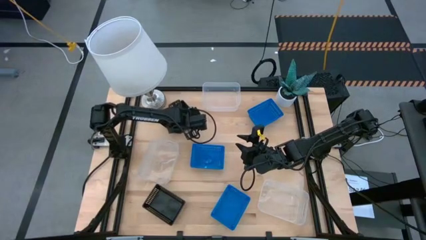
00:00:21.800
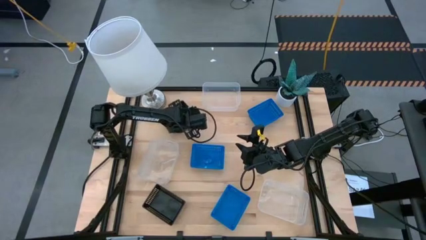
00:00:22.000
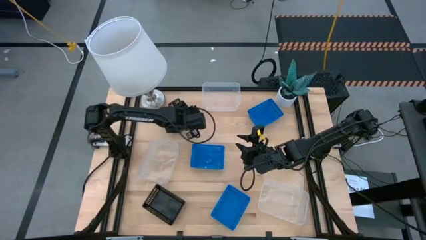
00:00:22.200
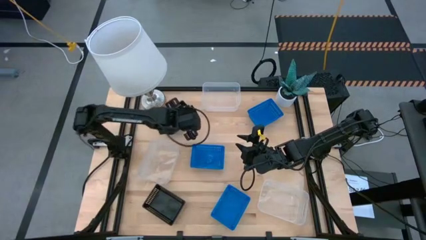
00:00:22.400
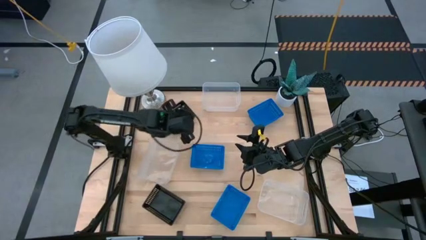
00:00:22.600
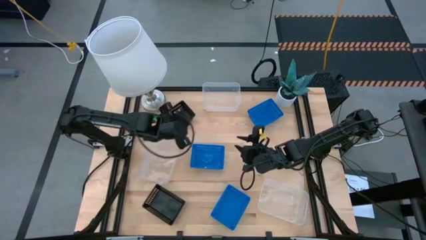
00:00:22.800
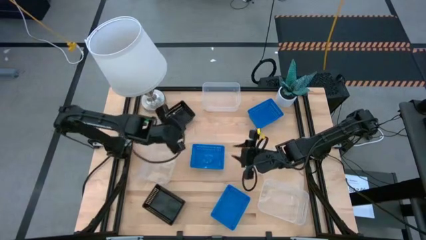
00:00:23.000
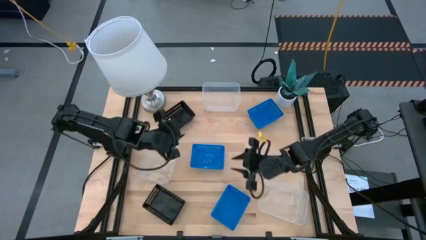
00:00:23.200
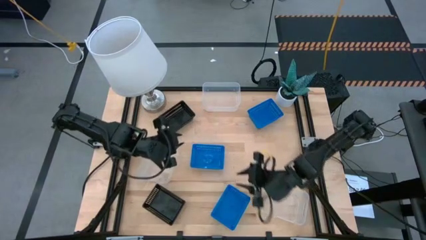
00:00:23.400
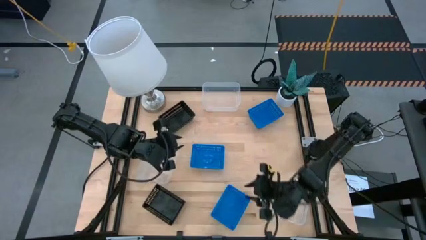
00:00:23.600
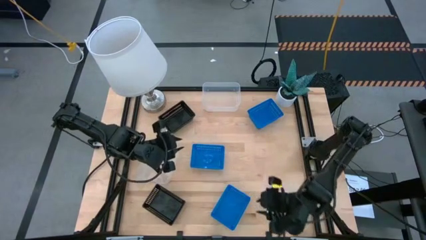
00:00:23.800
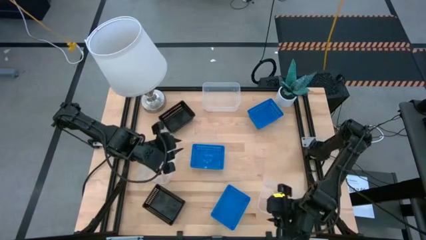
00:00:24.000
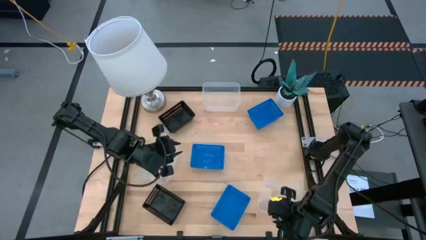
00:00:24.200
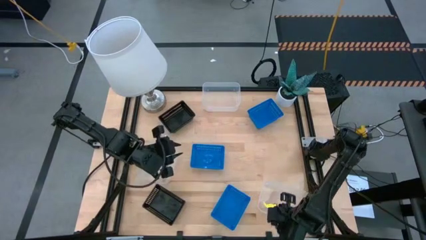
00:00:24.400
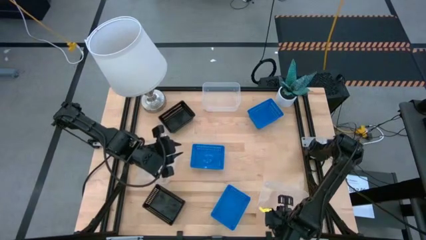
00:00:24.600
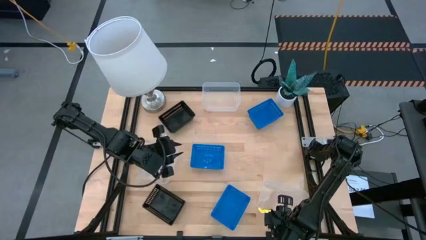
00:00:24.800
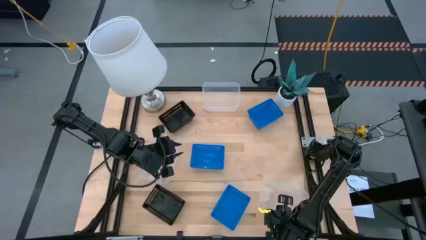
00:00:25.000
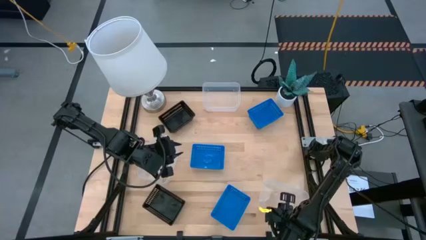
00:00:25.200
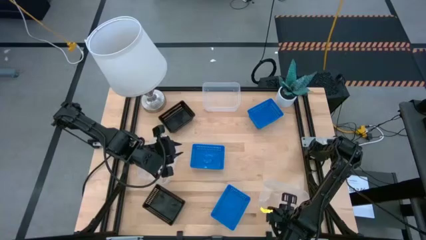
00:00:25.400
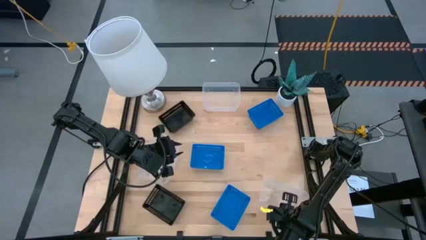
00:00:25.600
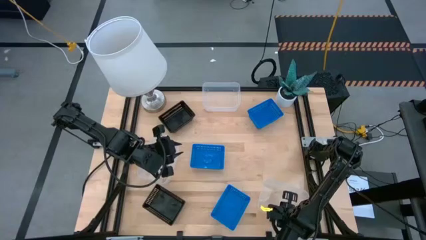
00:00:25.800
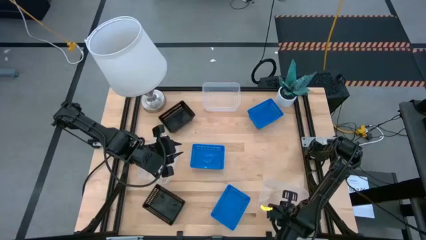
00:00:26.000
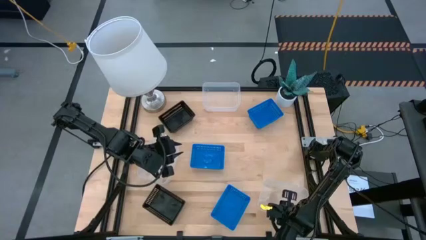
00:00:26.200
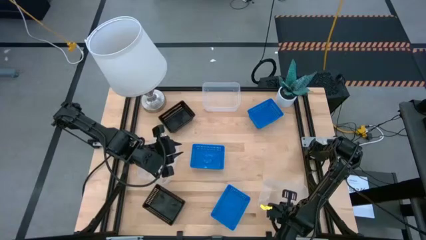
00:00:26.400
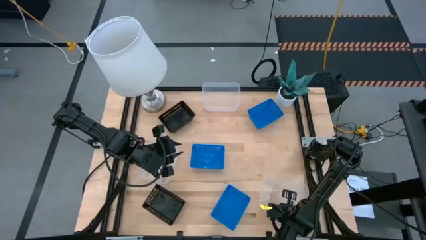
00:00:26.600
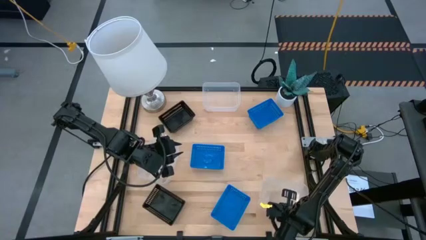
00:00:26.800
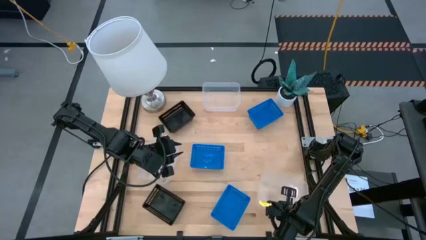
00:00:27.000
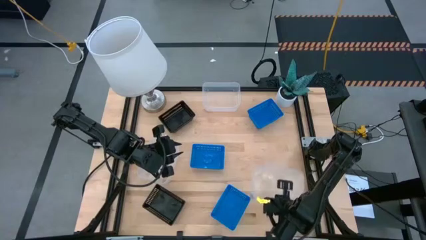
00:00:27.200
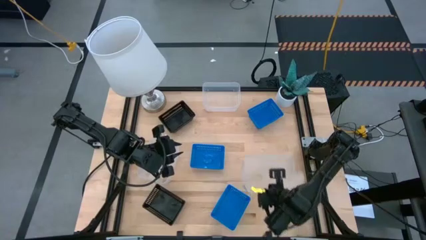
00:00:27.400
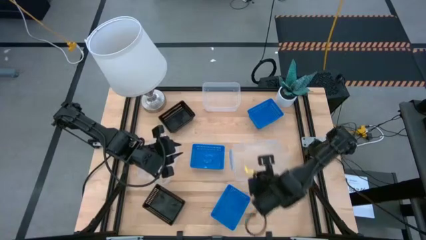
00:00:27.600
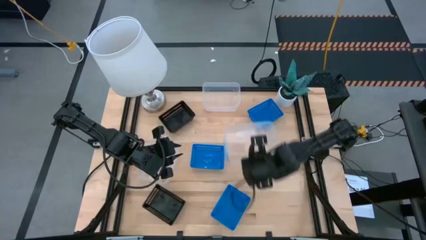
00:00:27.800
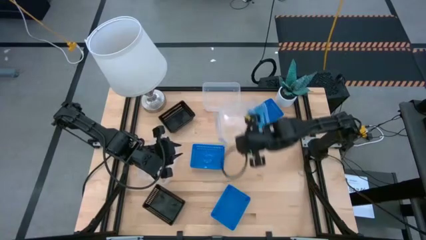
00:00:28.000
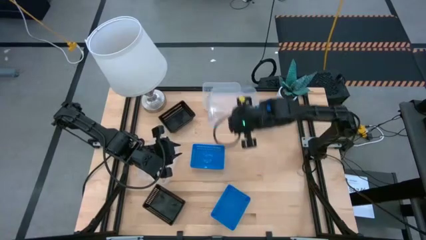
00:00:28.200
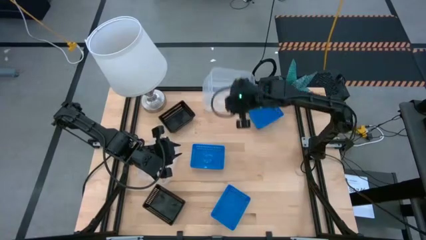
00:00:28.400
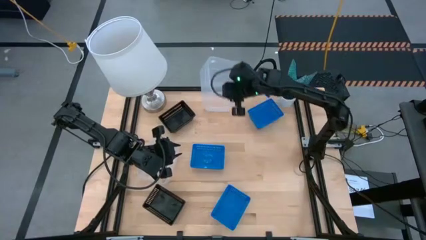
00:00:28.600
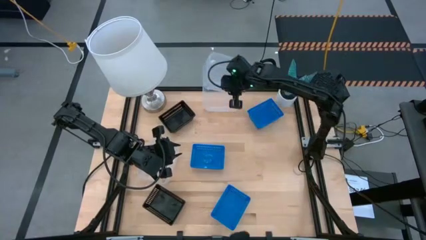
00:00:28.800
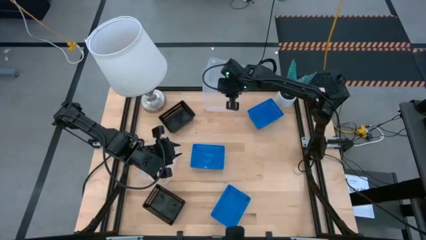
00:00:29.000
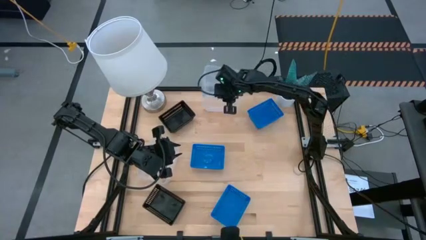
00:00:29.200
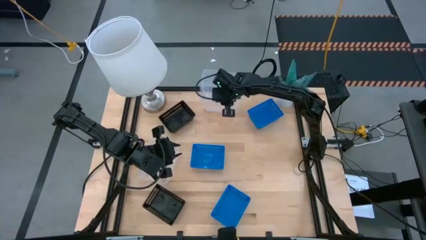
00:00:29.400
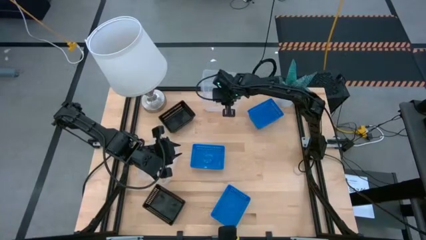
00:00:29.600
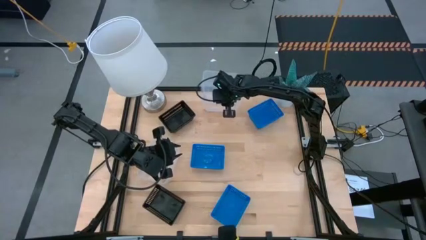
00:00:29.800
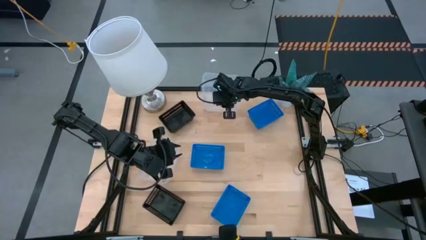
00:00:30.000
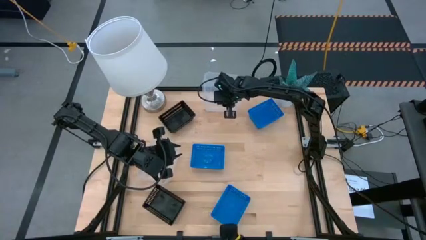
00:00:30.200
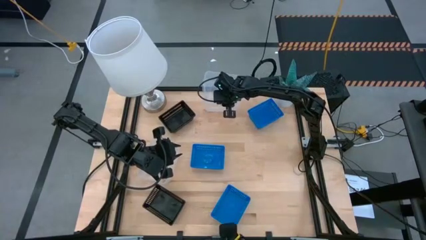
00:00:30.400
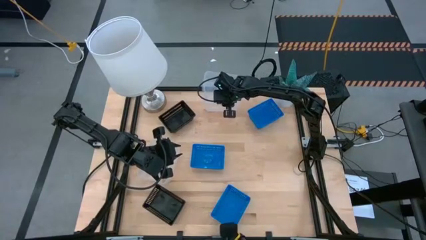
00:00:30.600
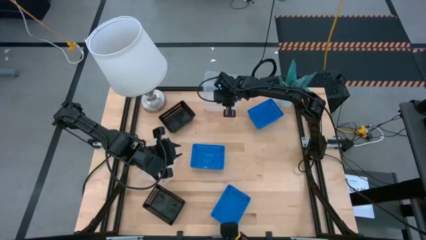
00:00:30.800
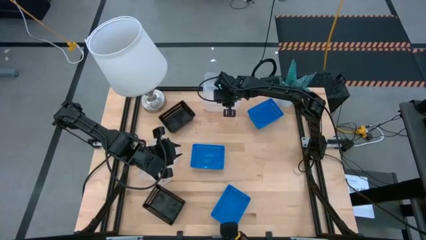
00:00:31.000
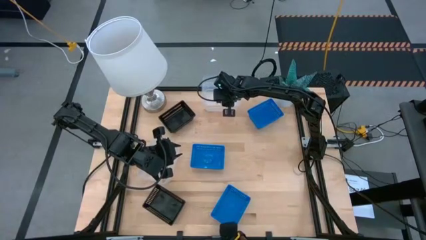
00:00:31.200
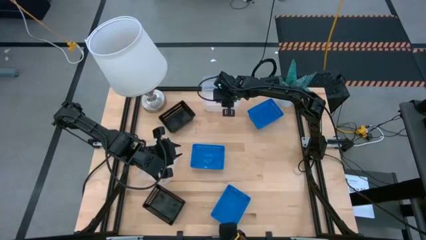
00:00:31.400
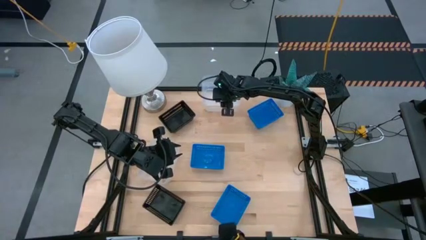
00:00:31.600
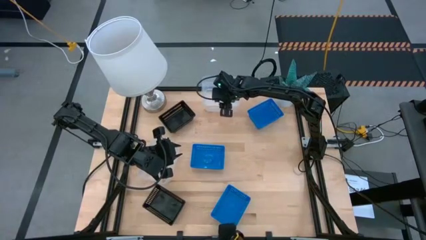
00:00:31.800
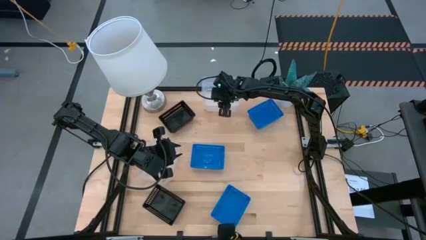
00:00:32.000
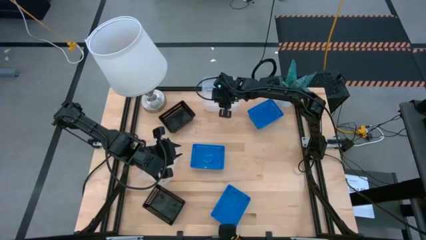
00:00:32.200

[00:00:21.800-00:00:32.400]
Stack the bottom right transparent bin on the top center transparent bin

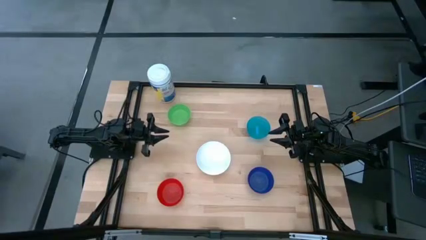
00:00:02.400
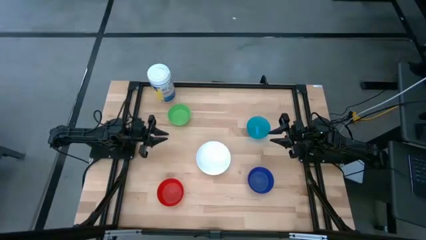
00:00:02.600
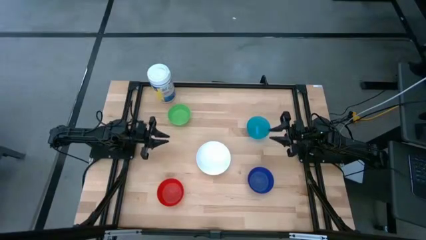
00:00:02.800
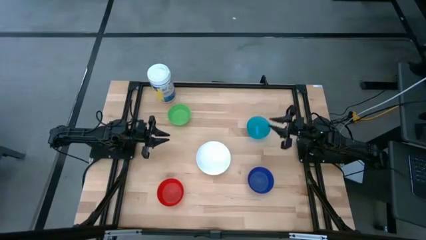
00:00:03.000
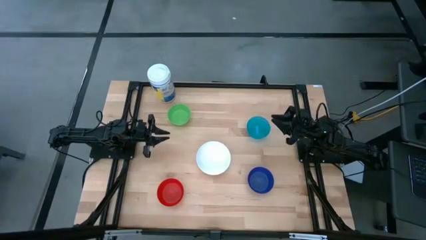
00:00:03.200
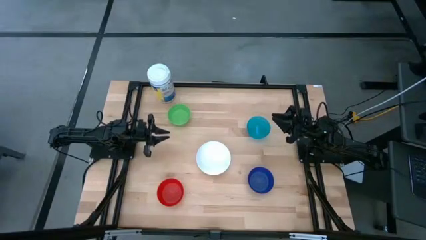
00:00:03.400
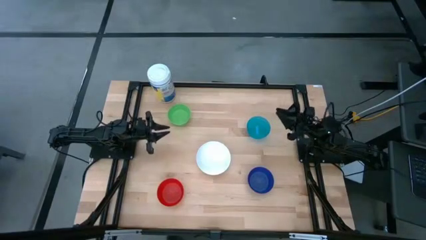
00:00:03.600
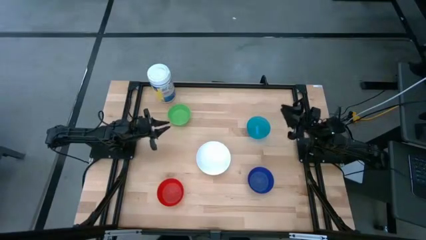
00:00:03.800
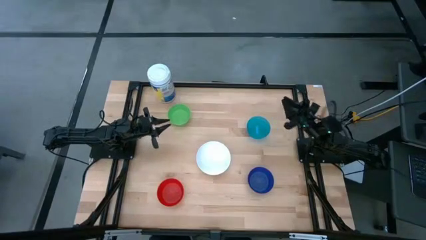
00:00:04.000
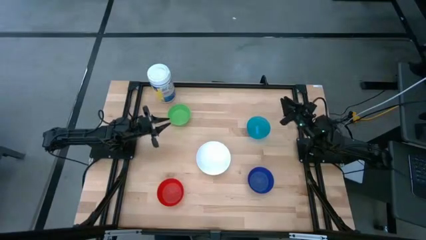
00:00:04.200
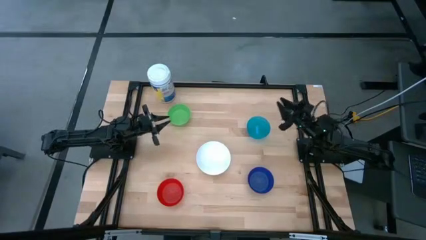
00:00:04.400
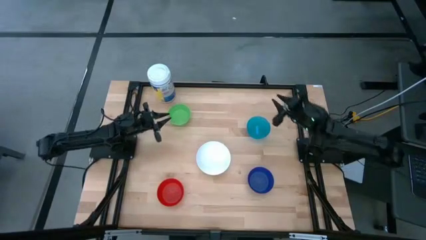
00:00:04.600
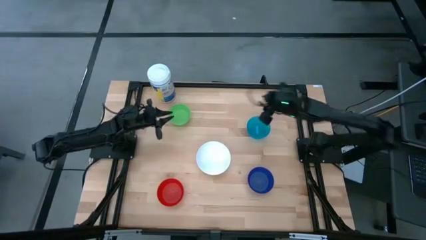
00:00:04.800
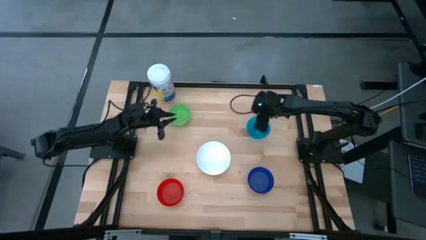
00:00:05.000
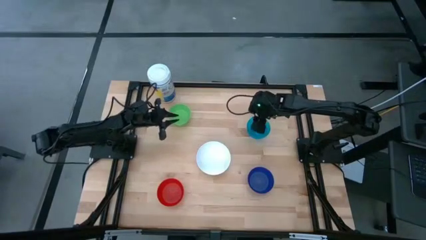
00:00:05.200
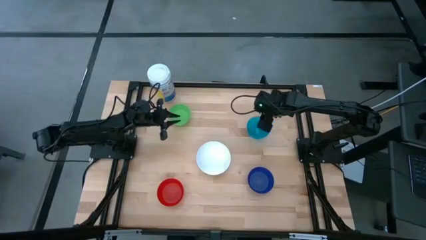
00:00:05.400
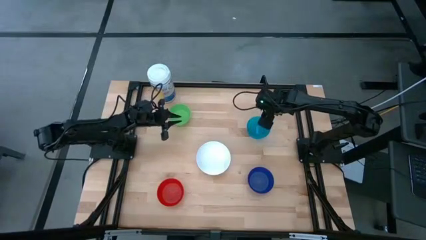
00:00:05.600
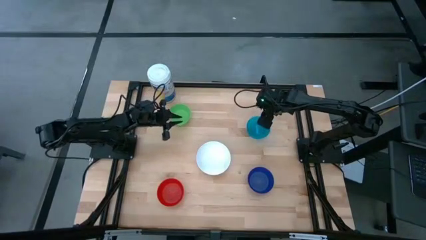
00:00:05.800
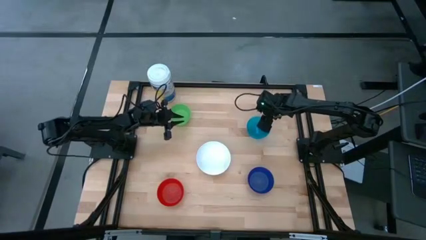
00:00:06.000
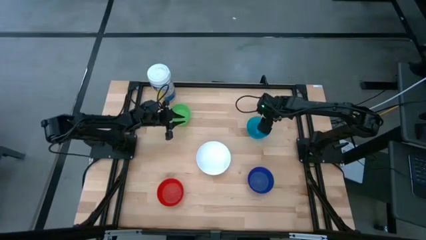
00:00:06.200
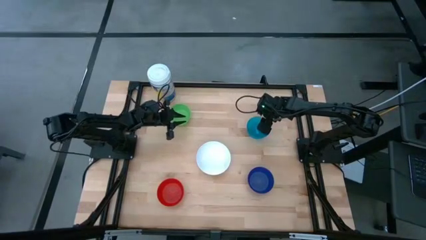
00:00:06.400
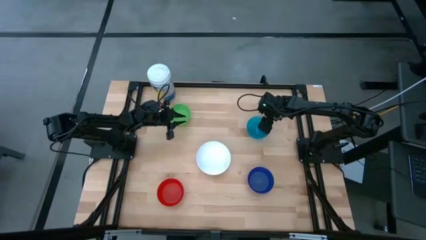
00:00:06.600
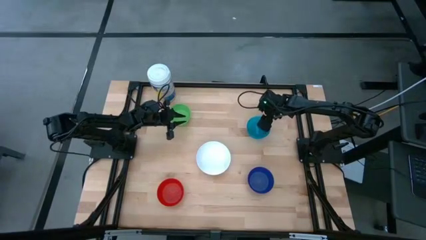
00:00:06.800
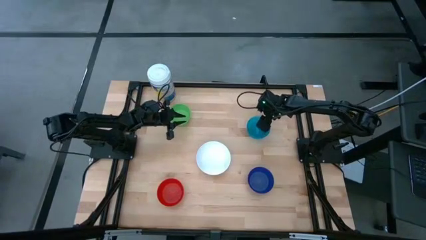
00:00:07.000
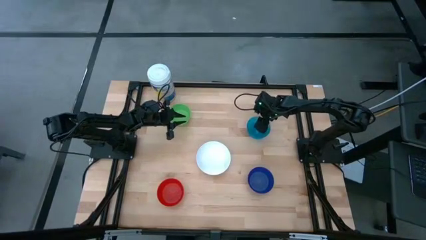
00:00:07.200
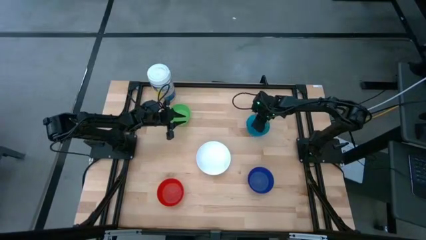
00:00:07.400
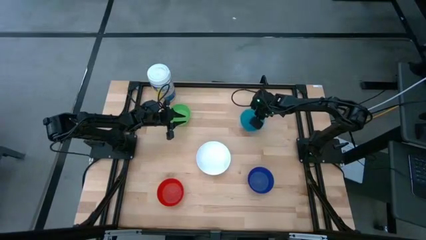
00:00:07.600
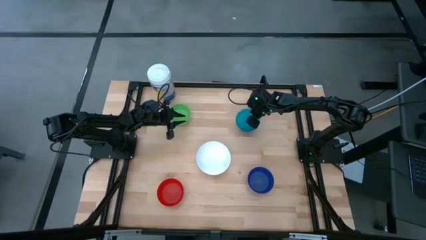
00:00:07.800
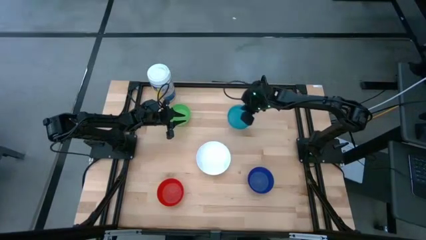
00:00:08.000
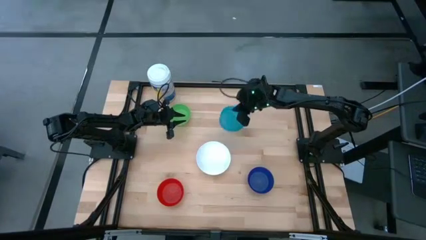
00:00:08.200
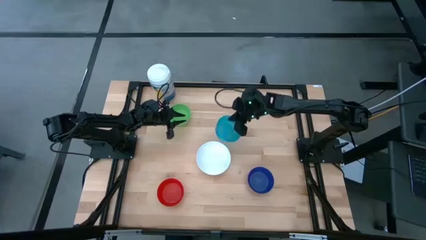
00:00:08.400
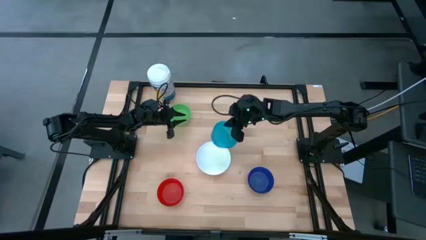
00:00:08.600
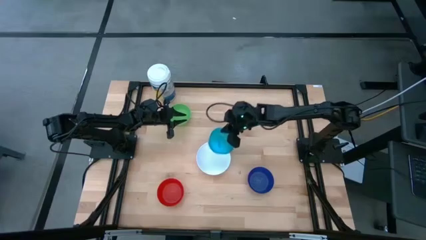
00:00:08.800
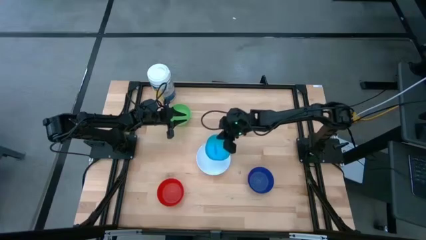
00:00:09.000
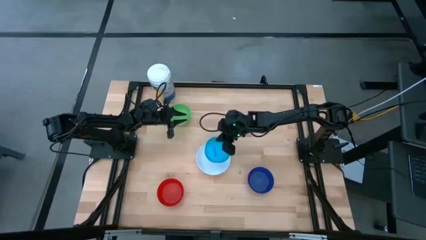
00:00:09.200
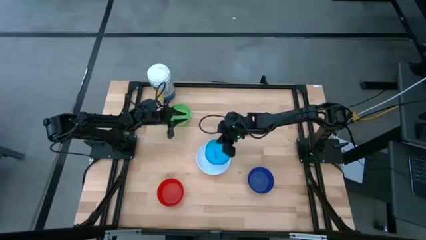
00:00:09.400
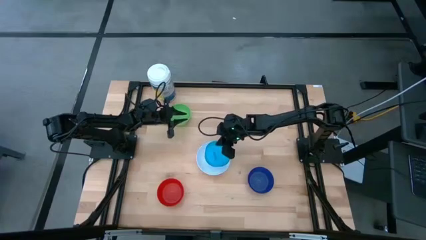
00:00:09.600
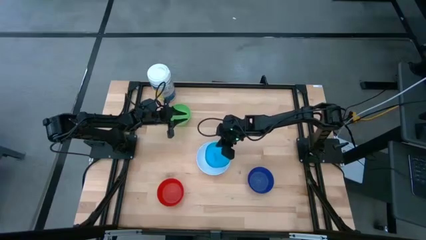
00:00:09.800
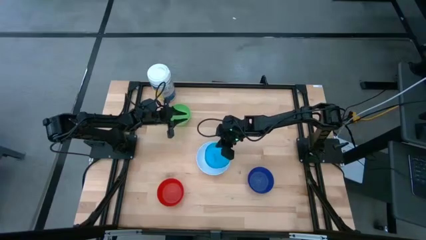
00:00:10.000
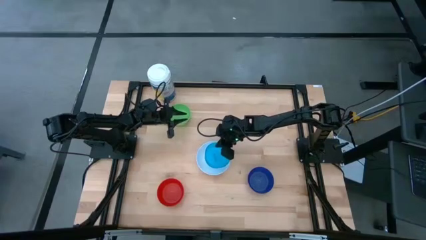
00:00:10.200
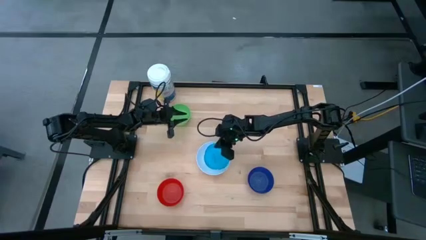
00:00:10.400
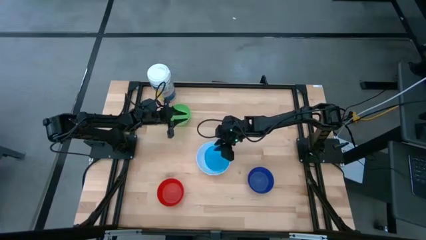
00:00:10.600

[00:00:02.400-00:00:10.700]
Stack the light blue bowl on the white bowl
